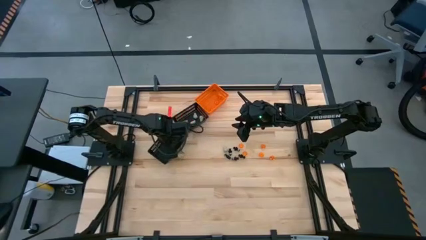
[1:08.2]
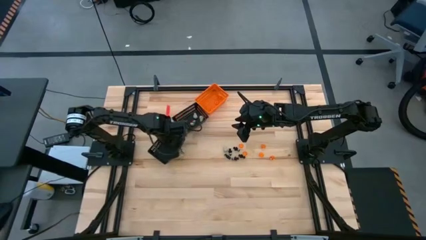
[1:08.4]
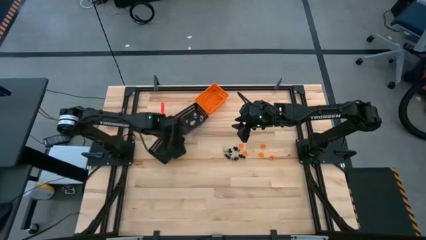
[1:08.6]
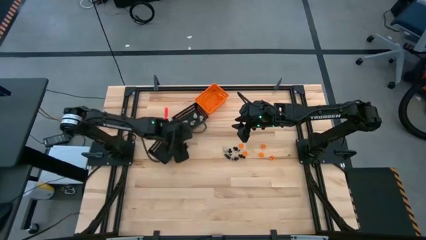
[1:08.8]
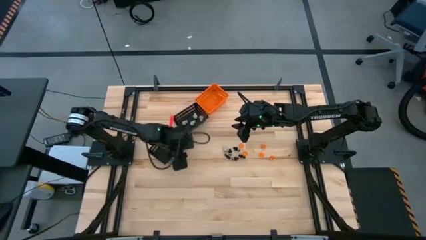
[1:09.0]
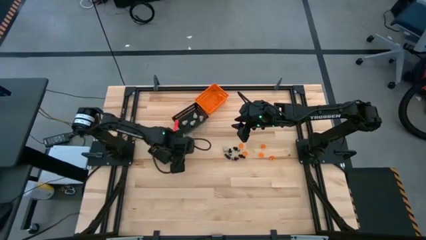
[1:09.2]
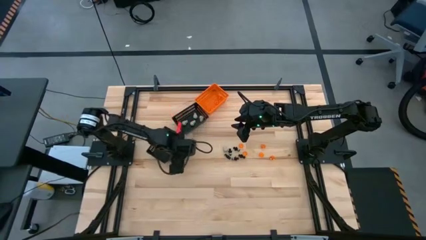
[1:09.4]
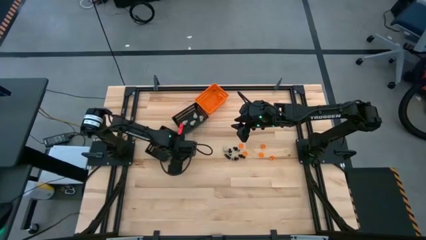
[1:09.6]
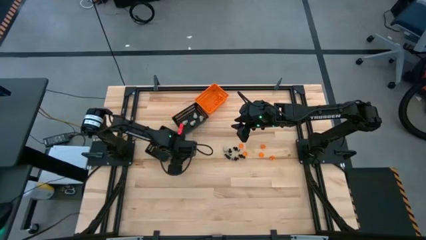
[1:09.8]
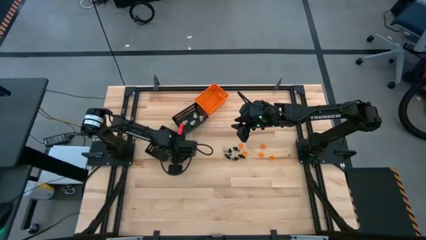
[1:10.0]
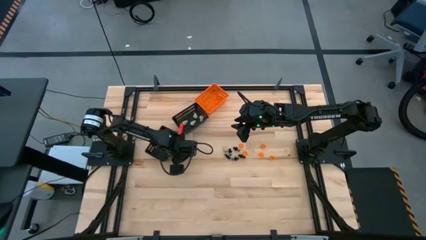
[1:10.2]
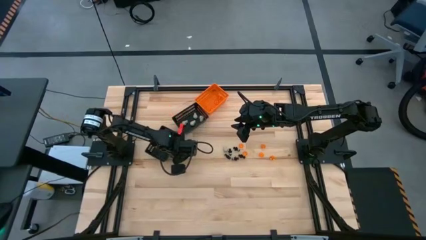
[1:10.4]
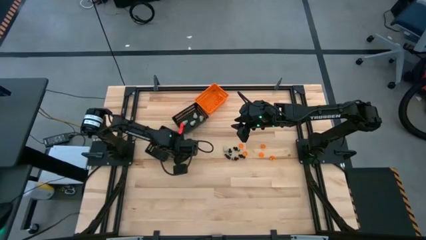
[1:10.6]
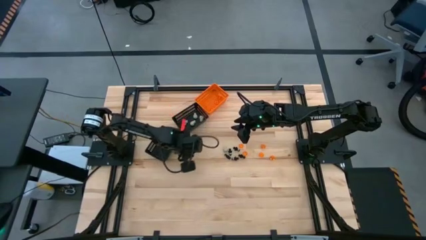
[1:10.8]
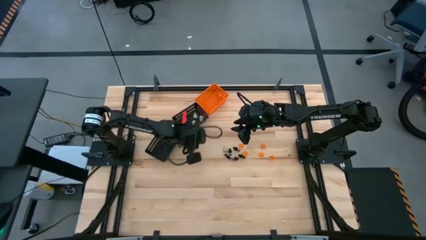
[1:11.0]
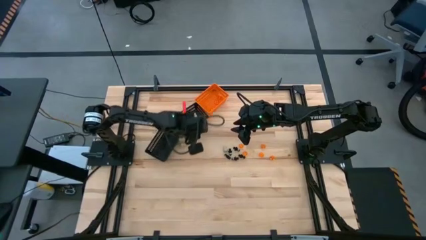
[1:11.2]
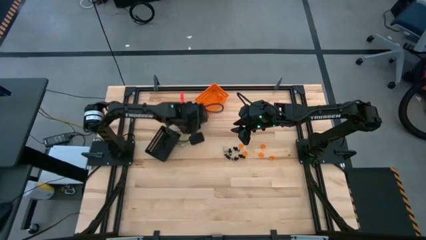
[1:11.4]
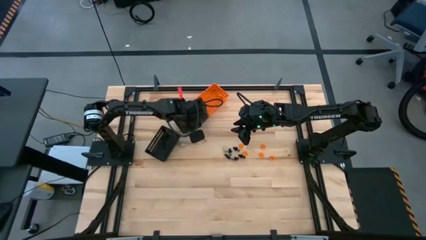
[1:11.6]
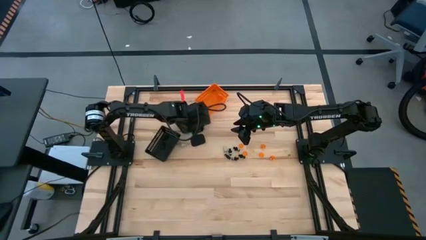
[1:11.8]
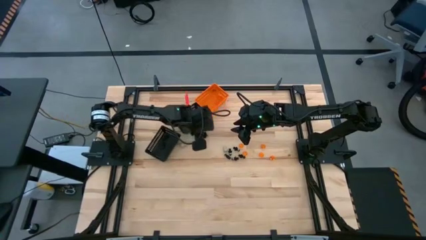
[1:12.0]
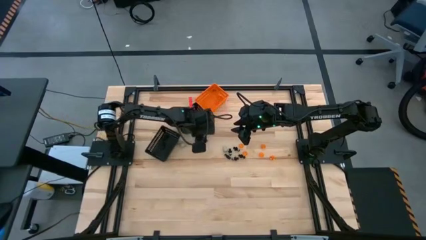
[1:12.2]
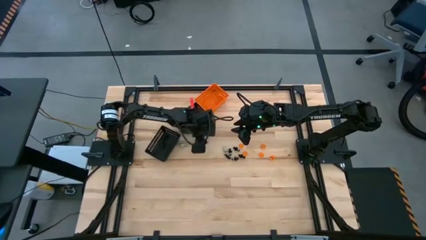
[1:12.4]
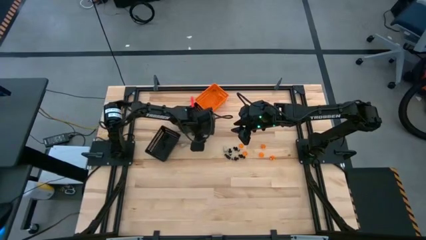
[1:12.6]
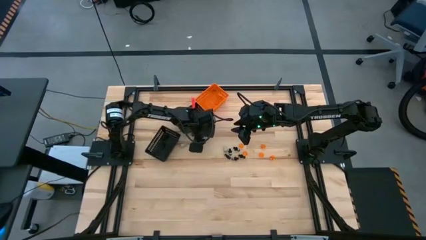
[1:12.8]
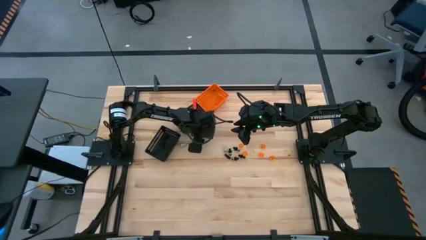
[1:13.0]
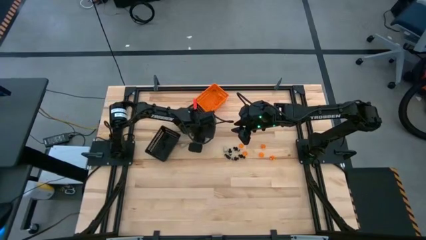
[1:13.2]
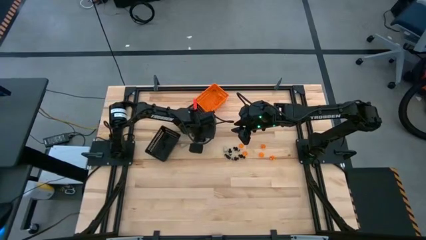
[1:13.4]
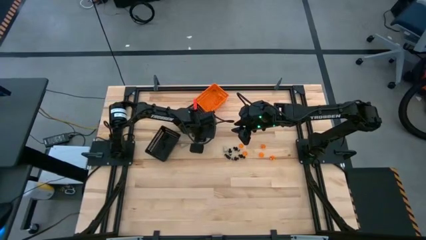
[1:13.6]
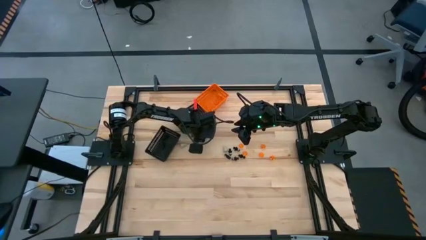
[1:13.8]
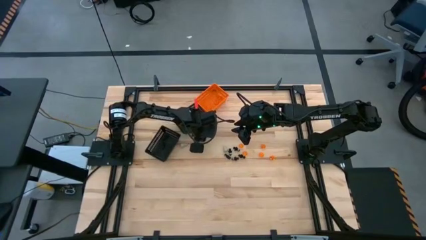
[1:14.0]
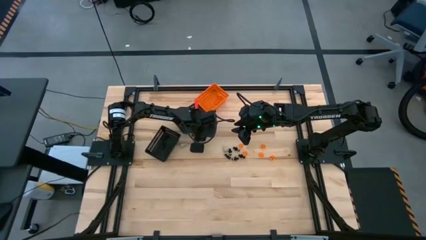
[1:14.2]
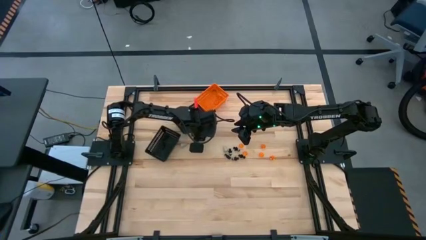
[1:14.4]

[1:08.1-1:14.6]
Task: Sort Halloween decoration
Put the white skull toy into the top black bin

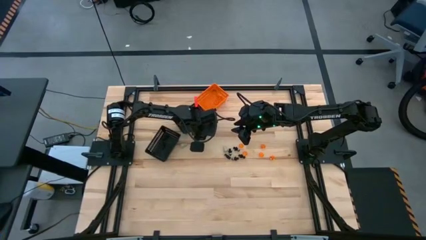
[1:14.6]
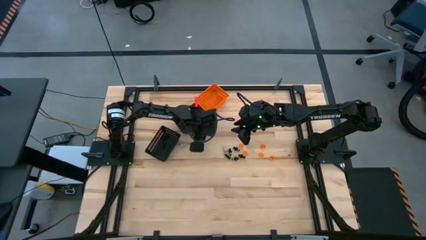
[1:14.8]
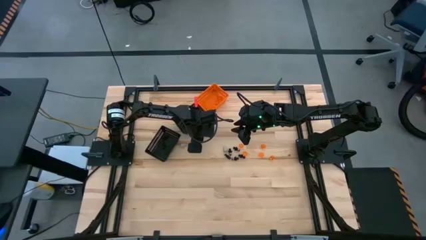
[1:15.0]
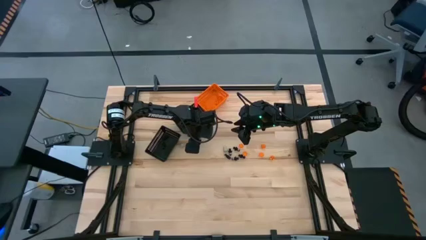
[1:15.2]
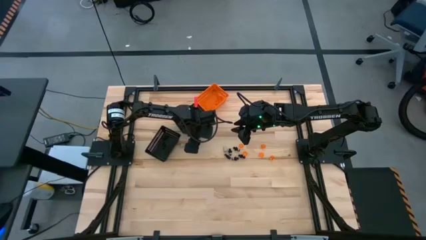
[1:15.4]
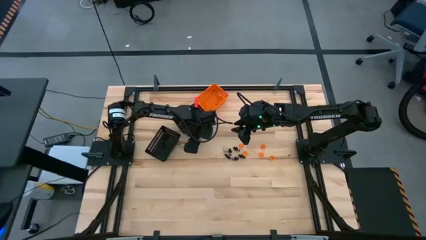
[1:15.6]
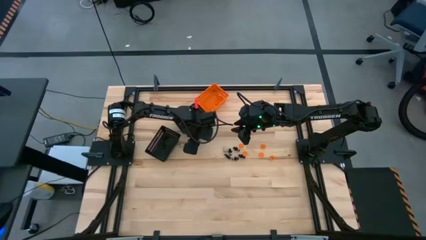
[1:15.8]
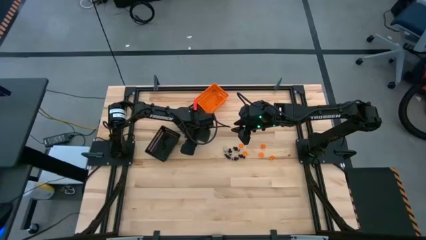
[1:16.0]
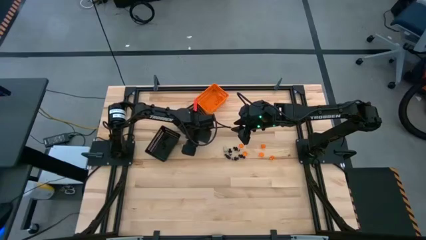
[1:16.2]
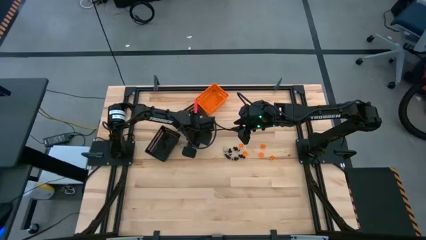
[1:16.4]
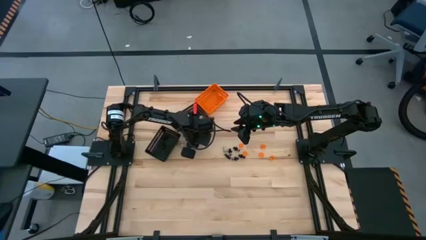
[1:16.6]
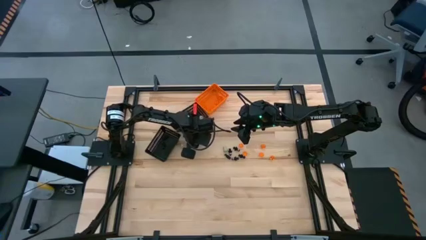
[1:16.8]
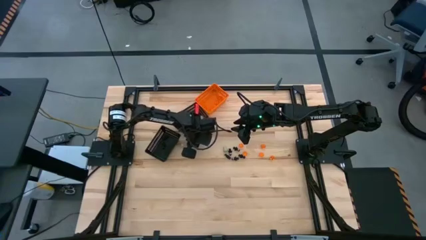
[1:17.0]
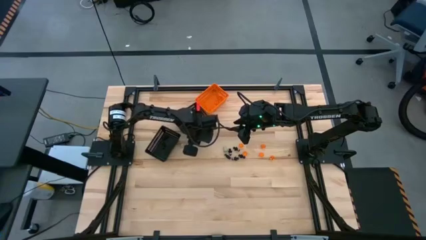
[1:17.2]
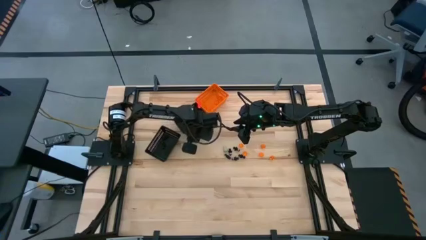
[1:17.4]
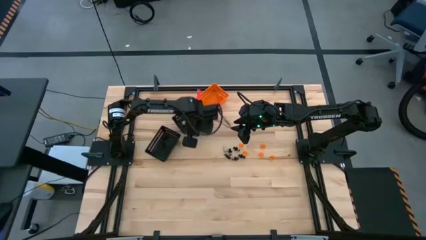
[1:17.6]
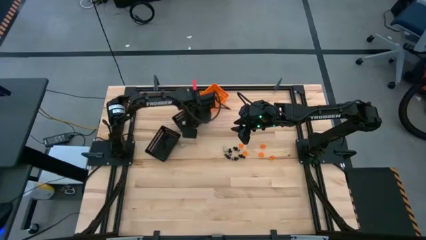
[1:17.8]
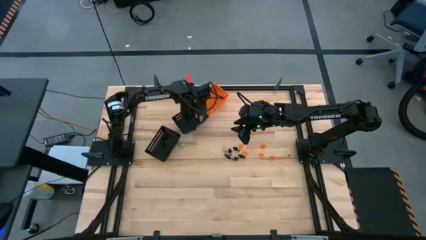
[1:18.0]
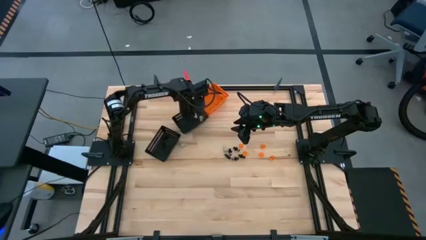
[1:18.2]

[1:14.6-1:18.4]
Put the white skull toy into the top black bin

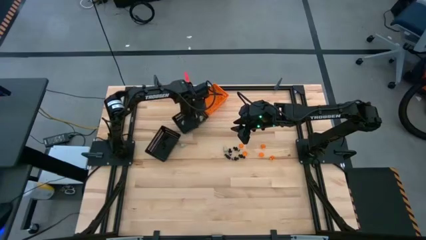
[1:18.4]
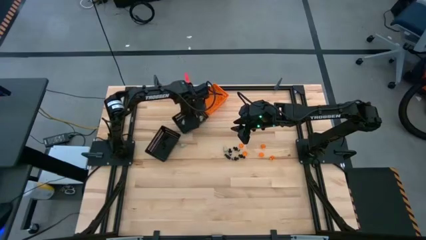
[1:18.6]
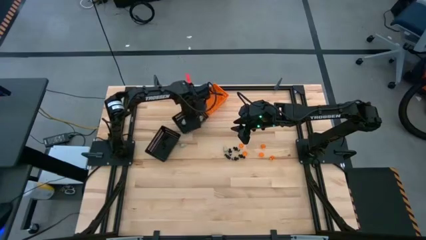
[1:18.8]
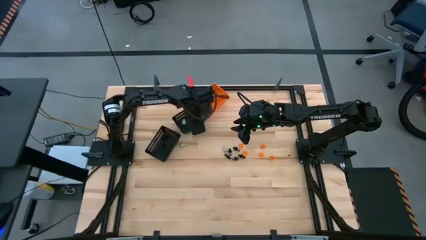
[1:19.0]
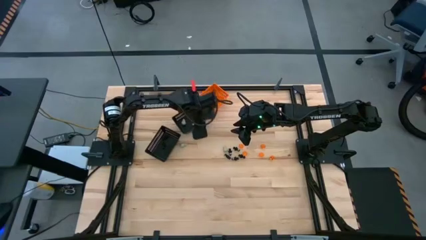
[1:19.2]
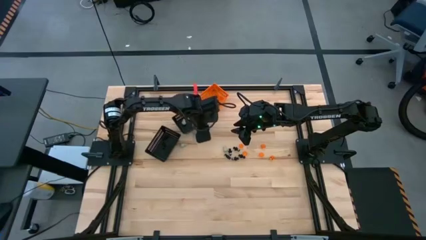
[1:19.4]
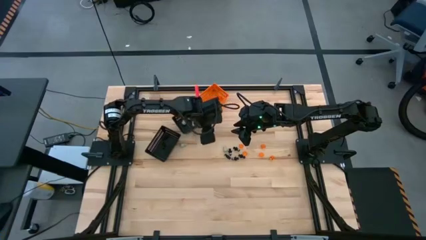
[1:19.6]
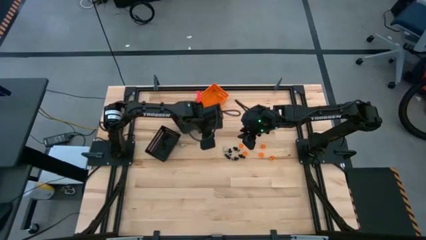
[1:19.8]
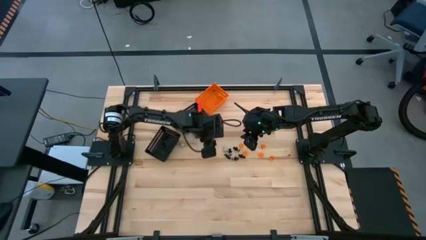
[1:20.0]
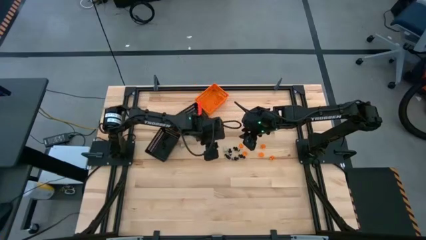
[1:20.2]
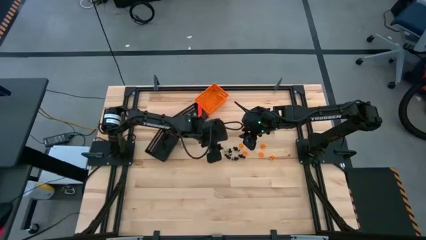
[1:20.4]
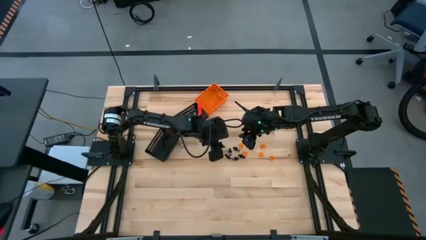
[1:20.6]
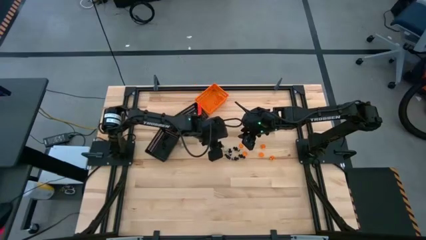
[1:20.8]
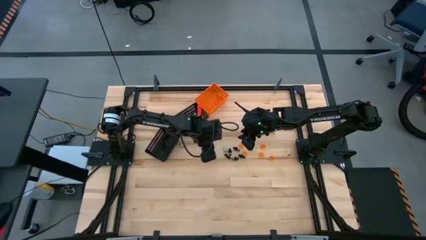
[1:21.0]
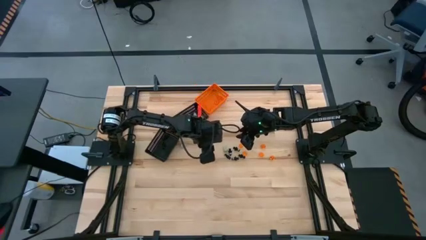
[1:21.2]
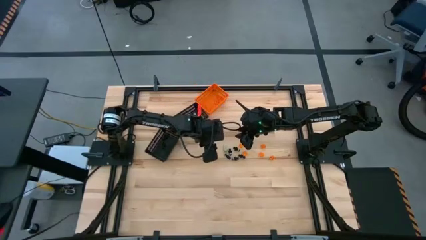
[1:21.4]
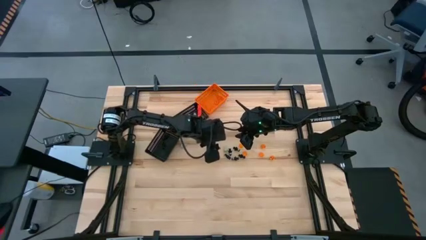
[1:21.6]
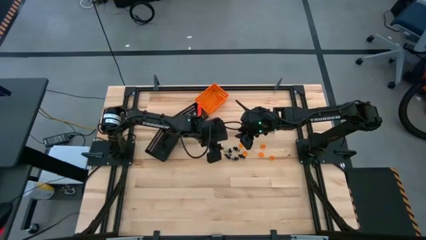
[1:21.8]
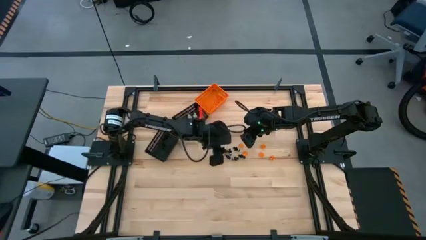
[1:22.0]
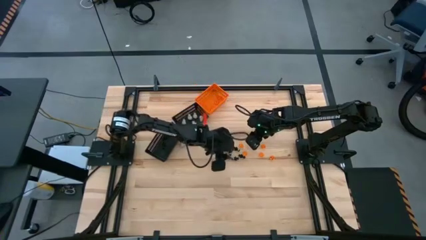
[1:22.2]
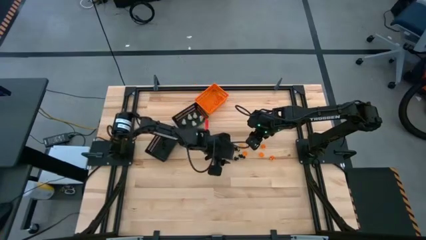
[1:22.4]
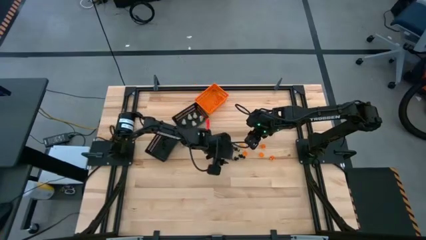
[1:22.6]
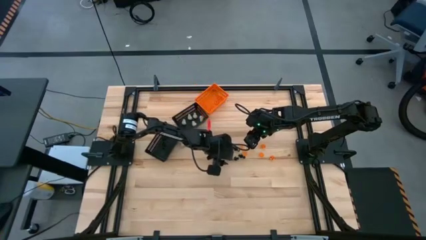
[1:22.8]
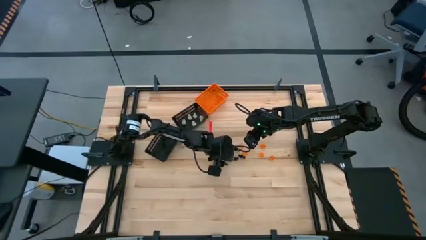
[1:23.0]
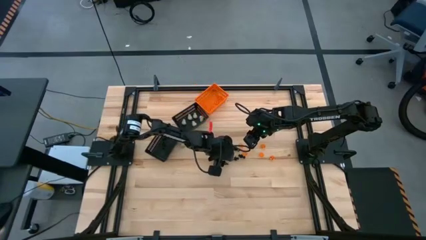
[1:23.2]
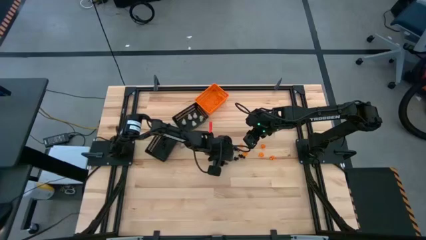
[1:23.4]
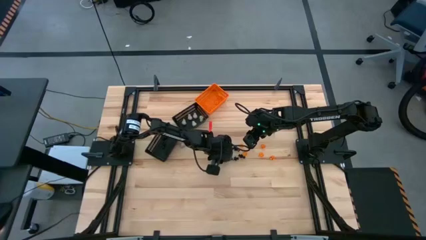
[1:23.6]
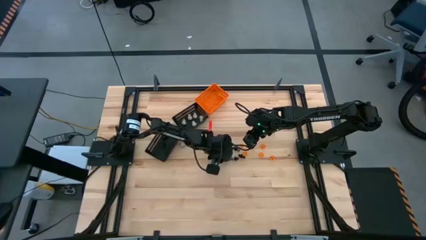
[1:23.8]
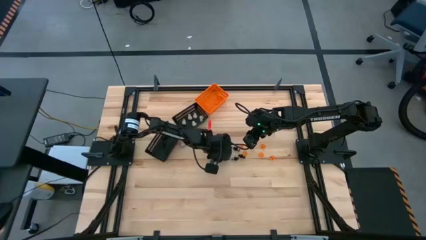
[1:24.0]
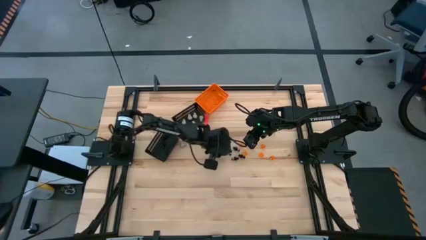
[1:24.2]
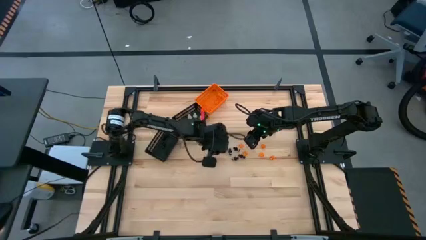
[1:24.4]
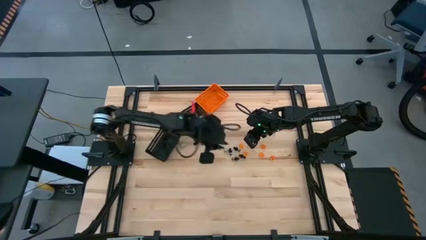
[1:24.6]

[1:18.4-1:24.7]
Put the black voodoo toy into the bottom black bin
